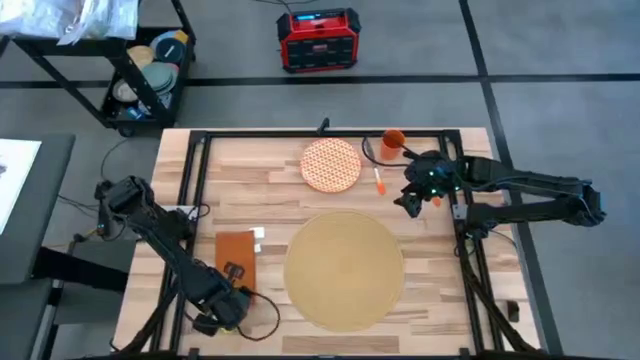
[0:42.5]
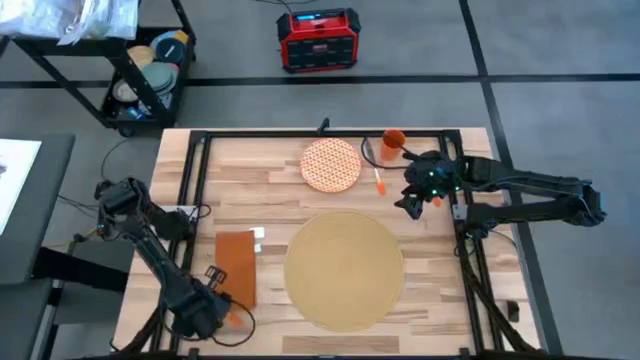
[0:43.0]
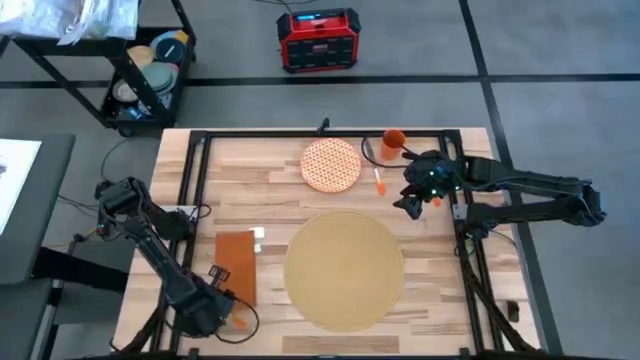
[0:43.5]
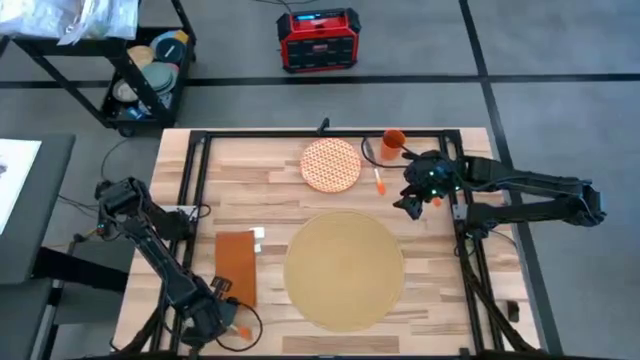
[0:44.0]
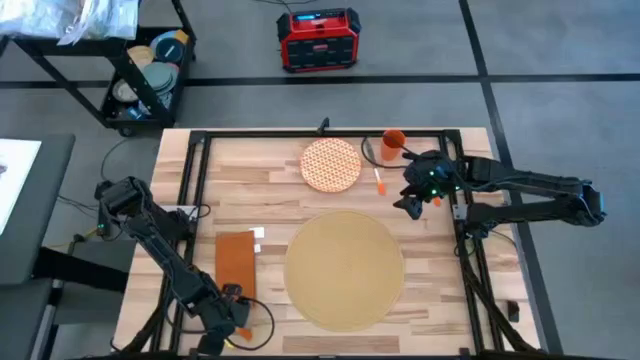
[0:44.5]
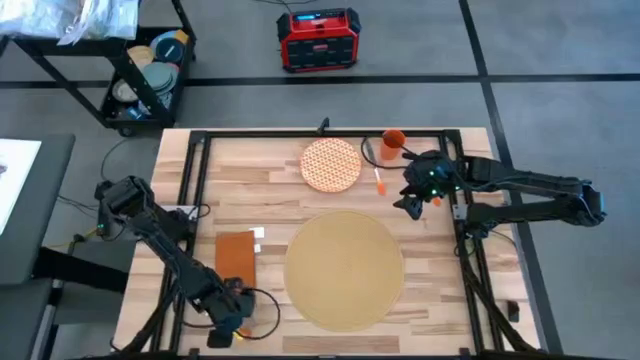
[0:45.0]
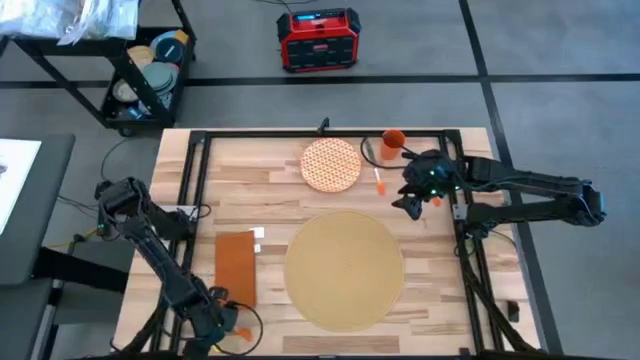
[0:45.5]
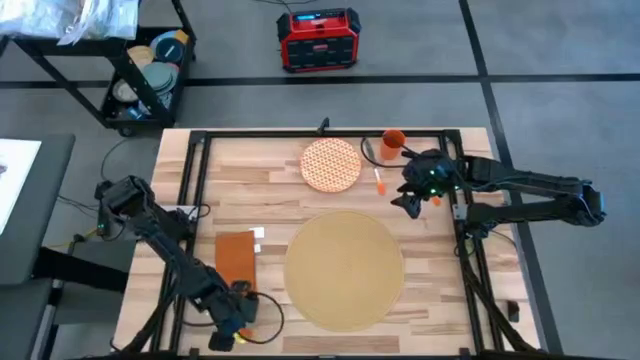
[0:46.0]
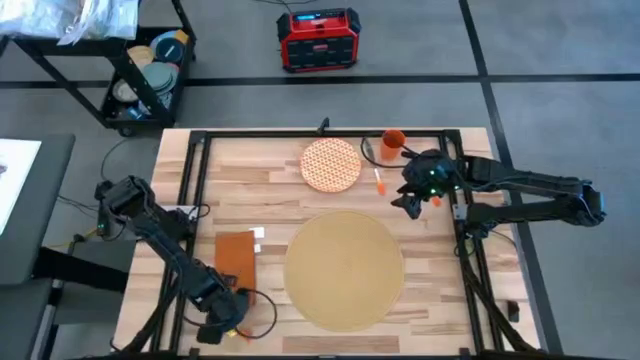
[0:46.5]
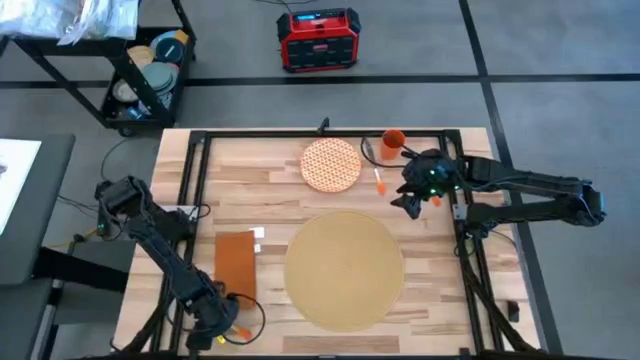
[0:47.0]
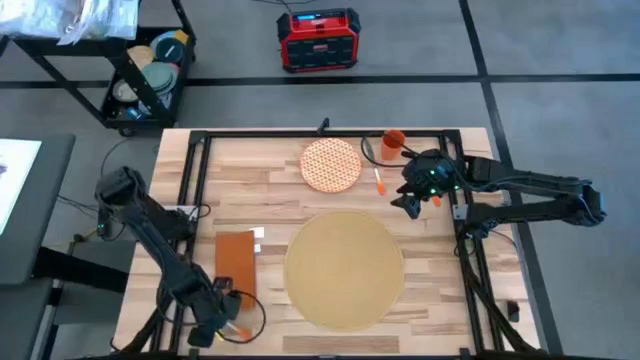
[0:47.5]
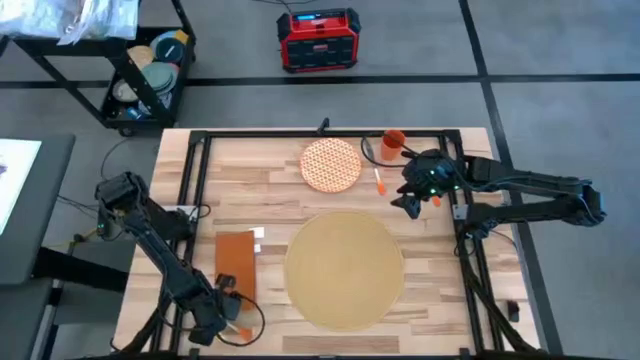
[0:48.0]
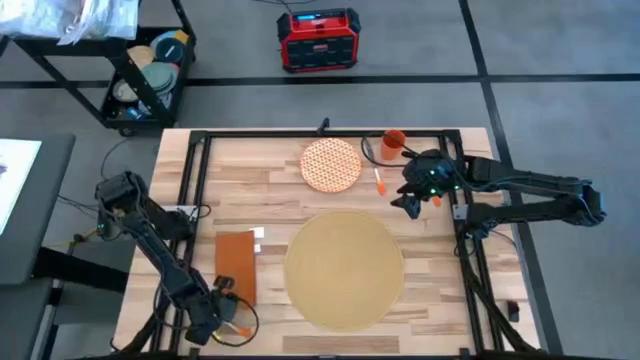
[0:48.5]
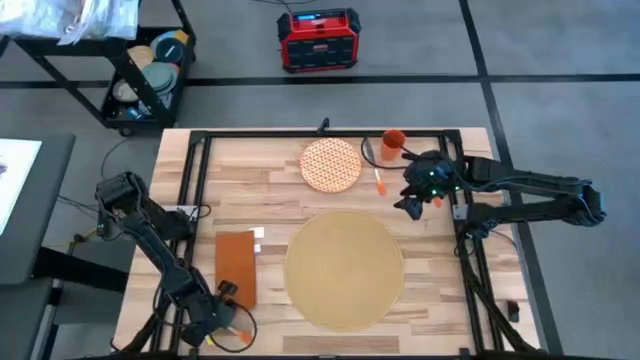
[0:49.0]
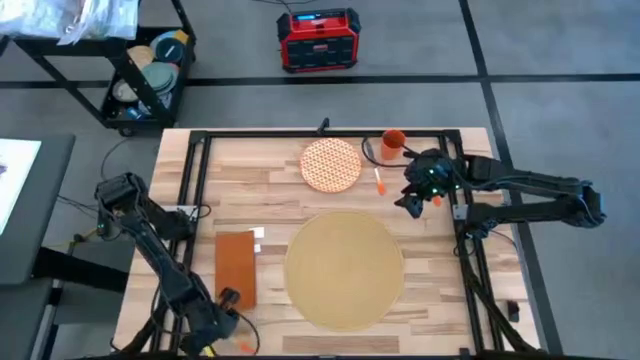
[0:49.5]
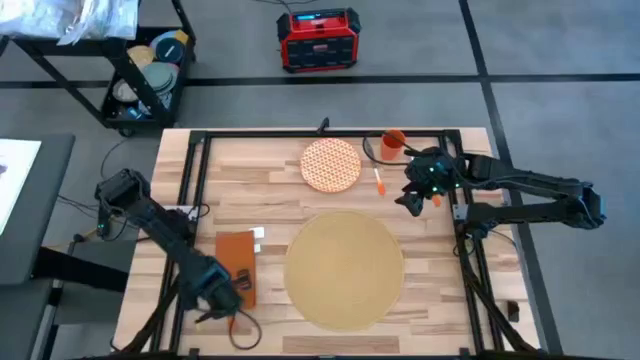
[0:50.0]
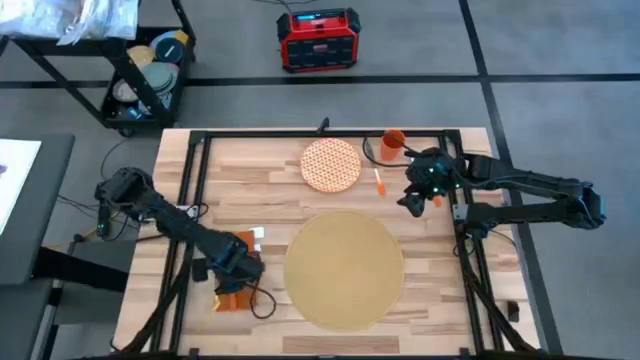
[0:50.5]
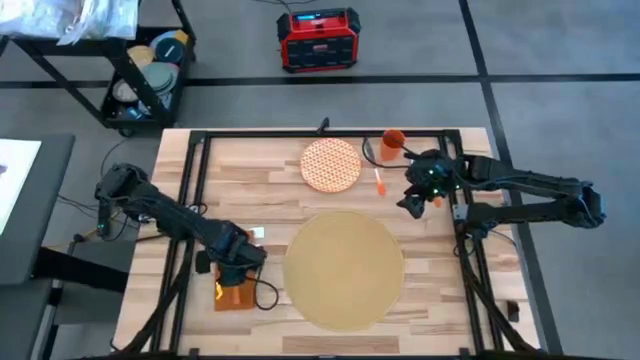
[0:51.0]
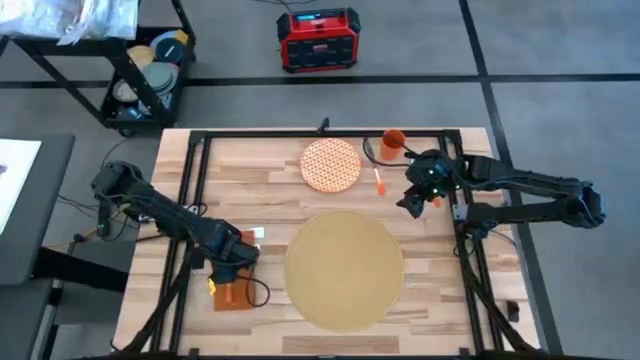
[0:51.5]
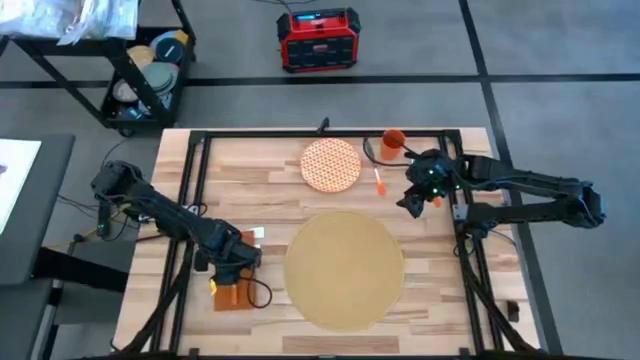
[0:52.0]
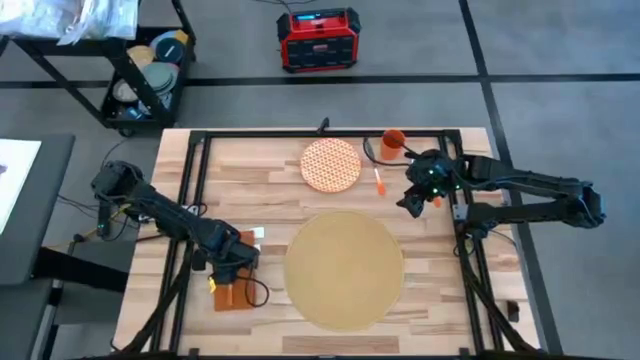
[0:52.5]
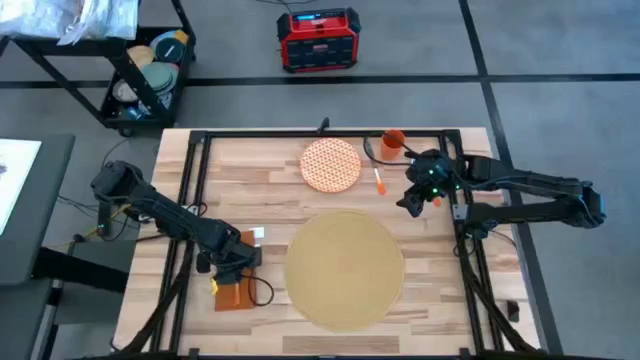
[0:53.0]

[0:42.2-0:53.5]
Task: Set table place
Put the orange fork on top of the orange table napkin

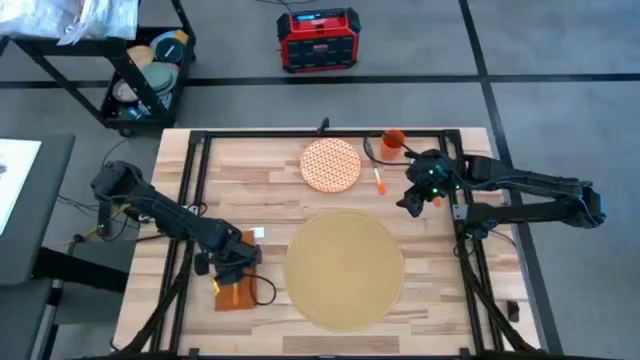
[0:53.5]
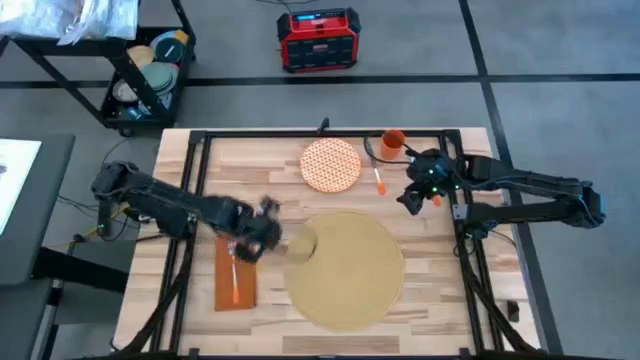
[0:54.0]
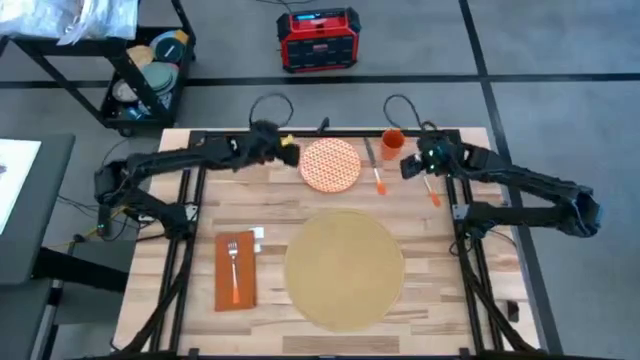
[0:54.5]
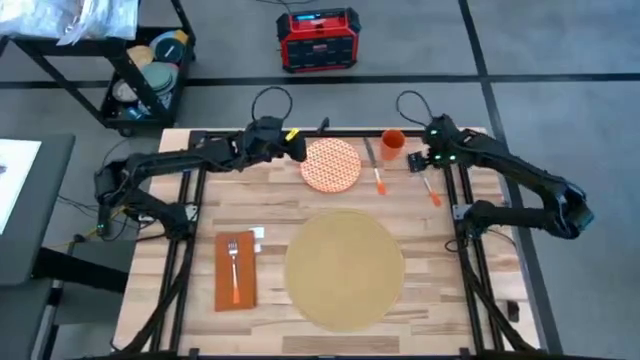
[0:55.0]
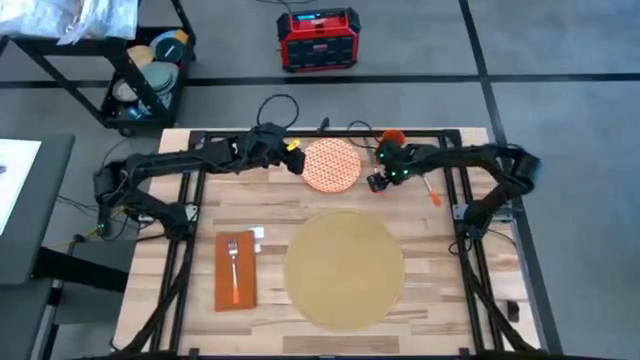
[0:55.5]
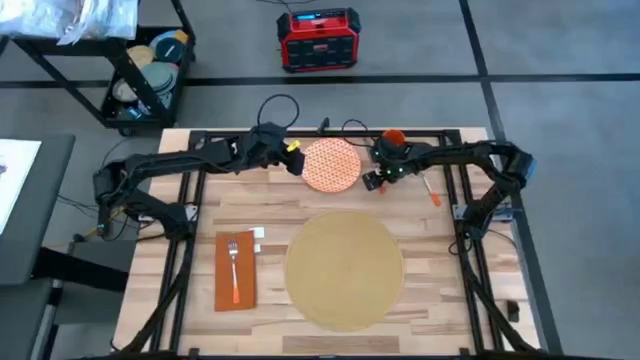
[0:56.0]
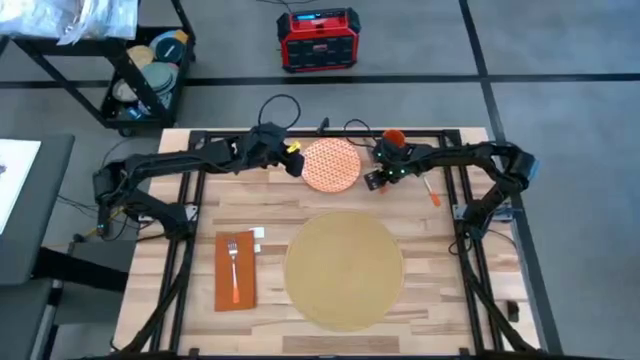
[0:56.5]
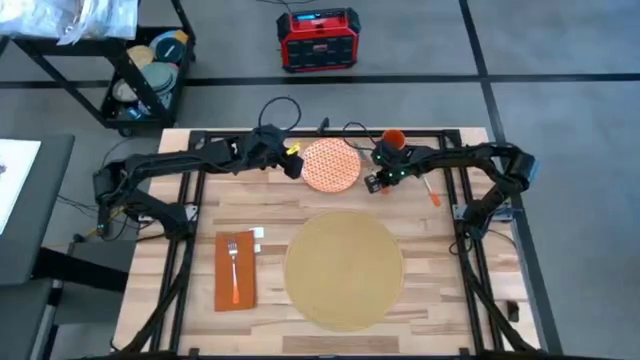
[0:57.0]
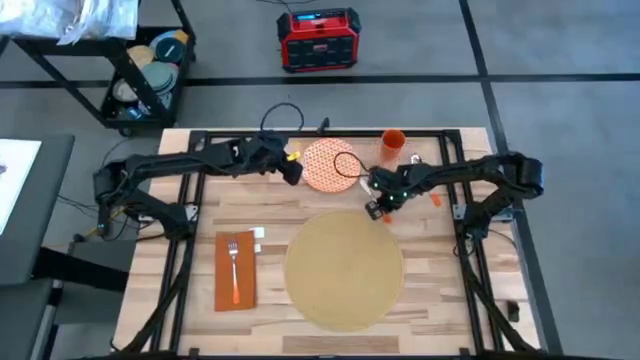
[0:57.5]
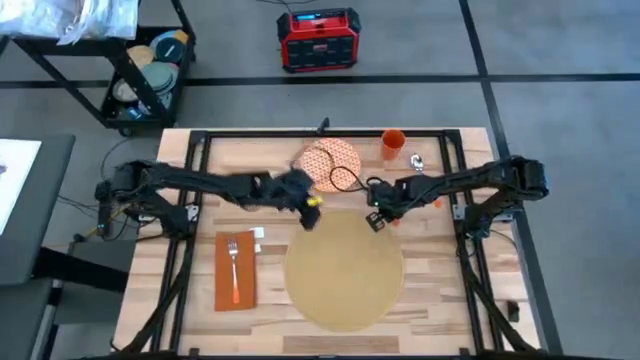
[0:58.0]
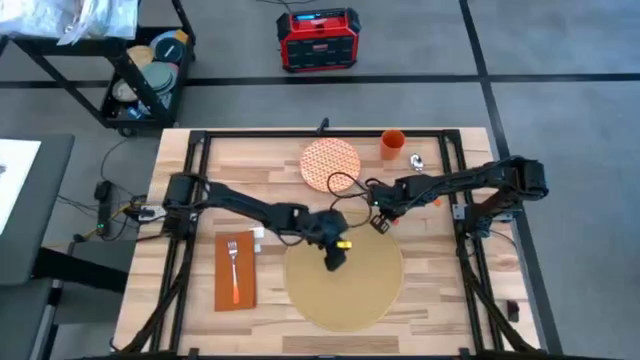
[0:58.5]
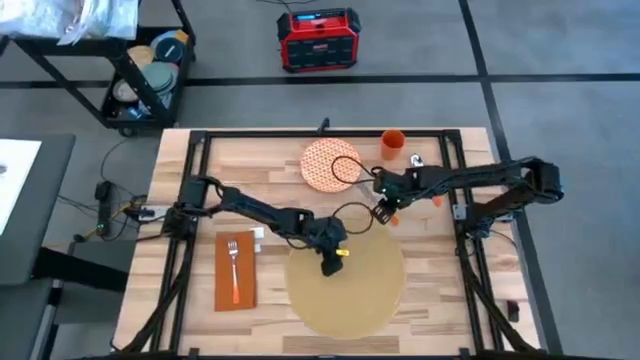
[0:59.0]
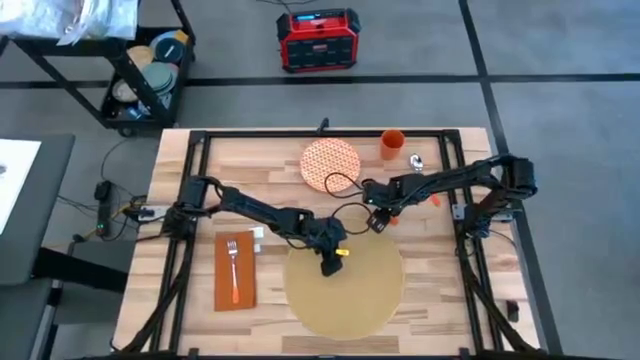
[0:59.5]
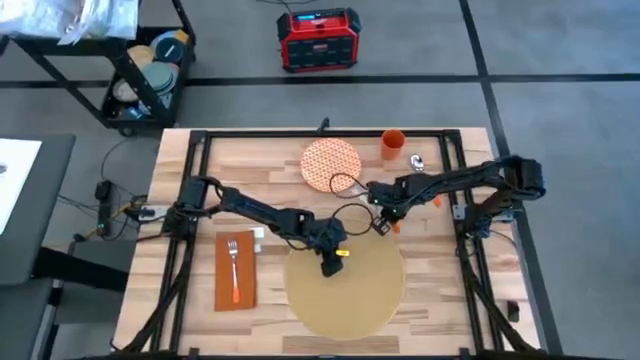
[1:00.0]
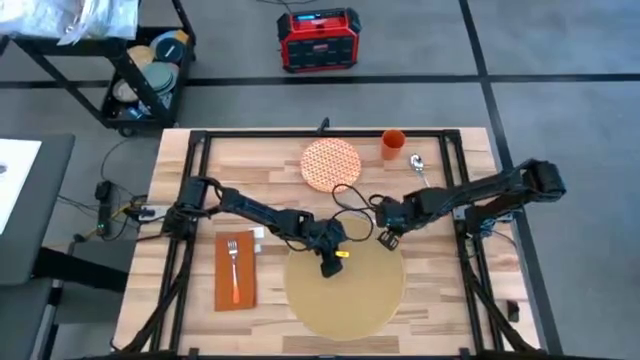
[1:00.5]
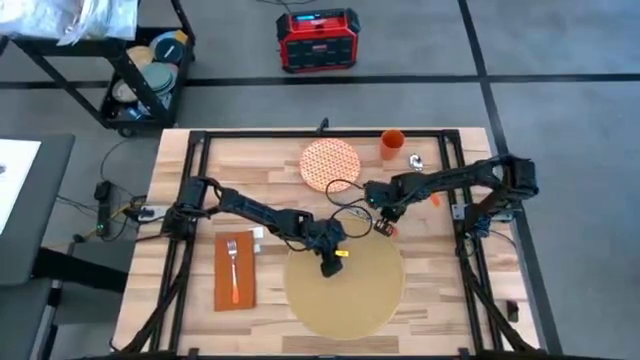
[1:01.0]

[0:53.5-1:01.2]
Put the orange table knife on top of the brown placemat

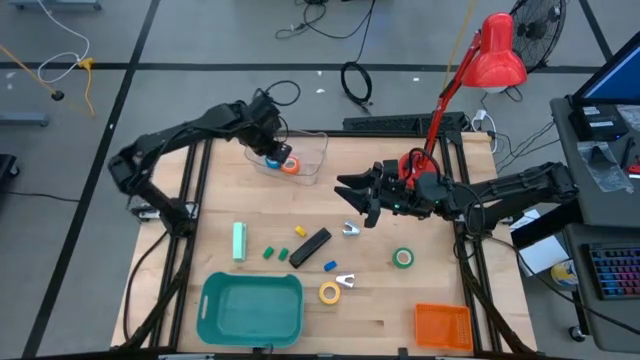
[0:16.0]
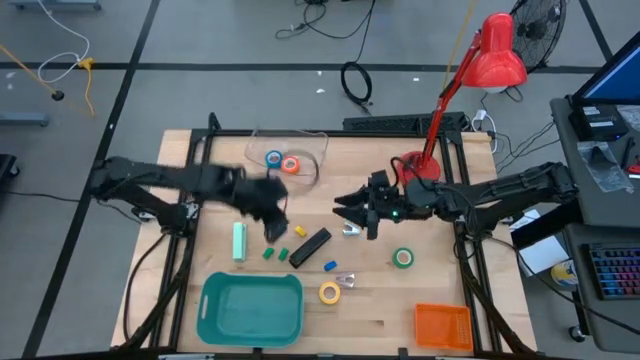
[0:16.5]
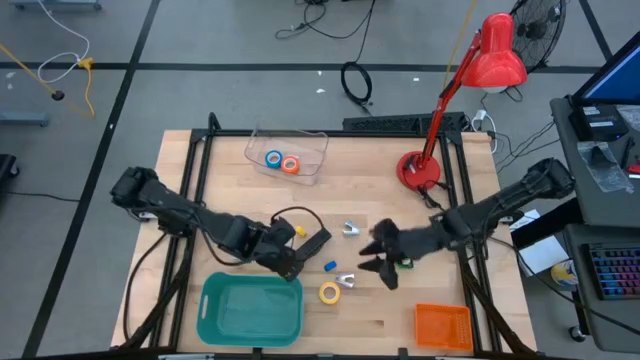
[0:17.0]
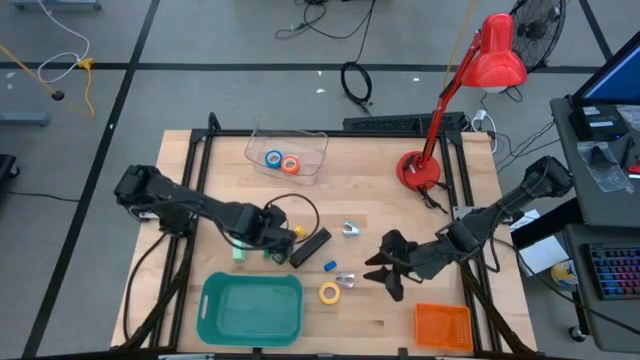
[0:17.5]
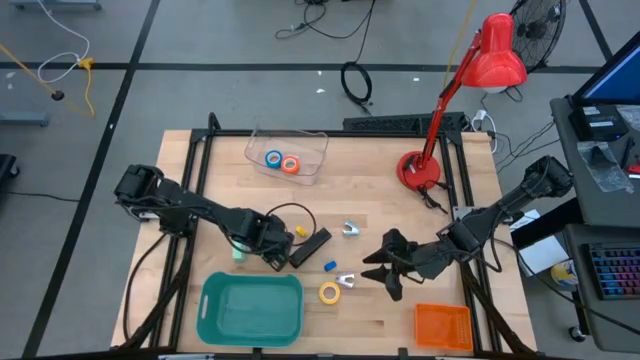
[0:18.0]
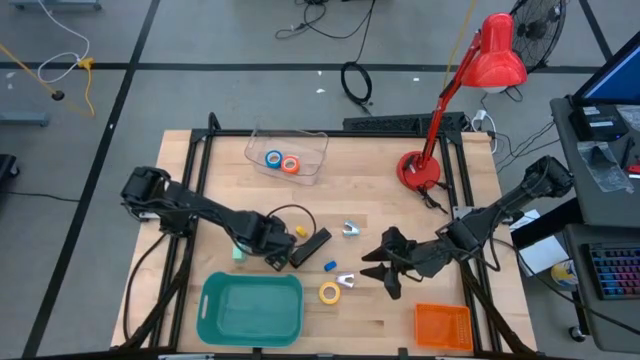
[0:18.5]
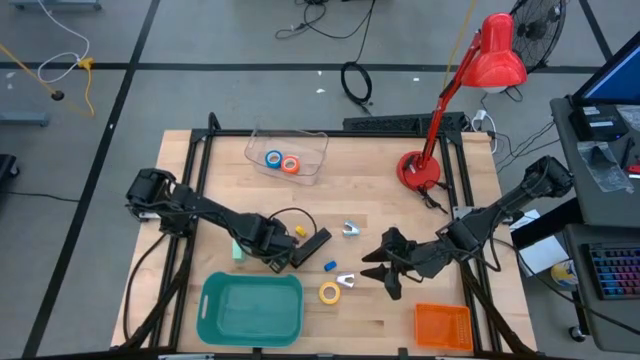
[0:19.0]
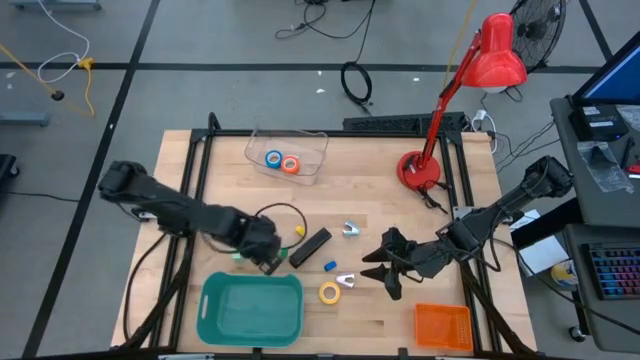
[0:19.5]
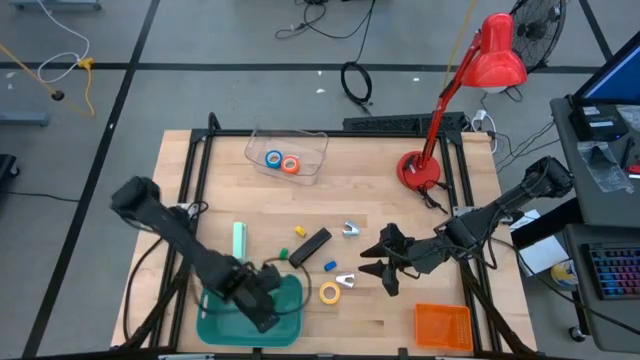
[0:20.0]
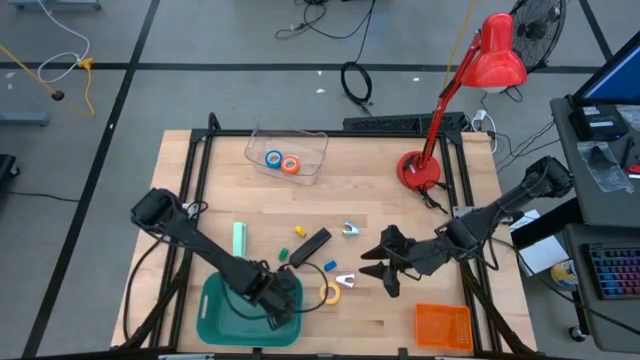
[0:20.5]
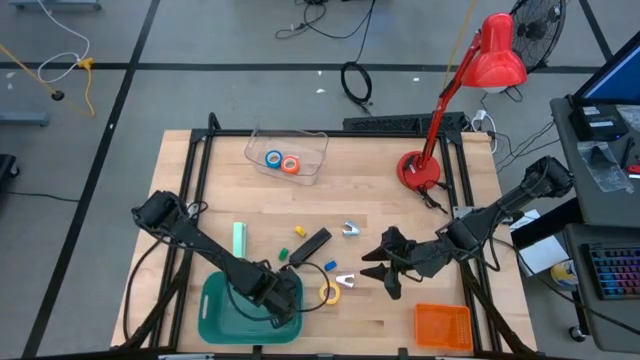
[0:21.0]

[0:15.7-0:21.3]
Task: Pick and place Stapler, Stapler remover, tape
Put the left small green stapler into the green bin
